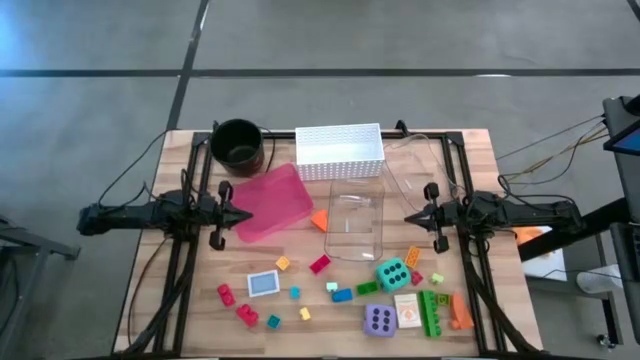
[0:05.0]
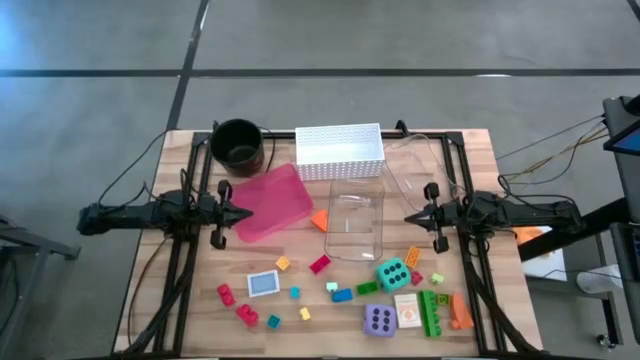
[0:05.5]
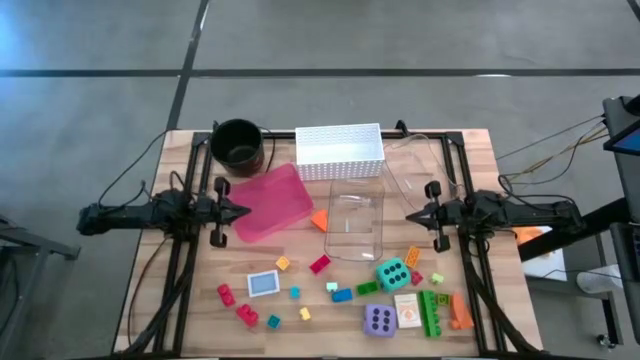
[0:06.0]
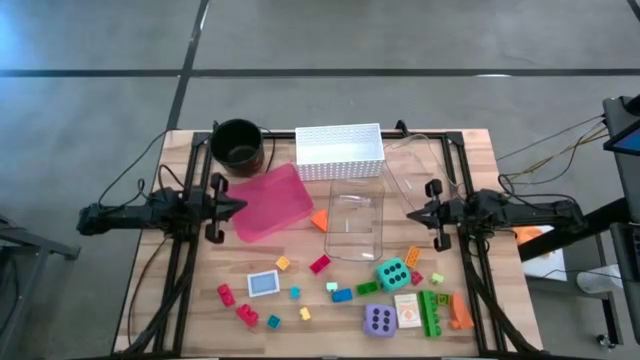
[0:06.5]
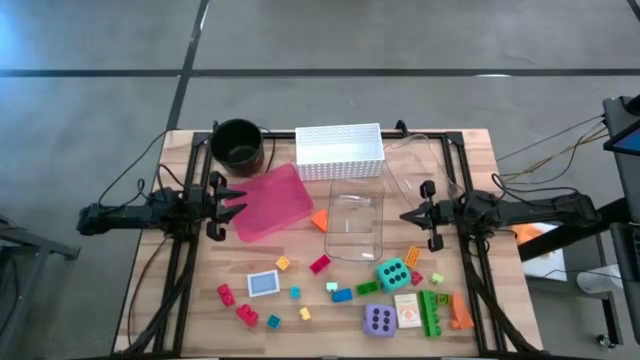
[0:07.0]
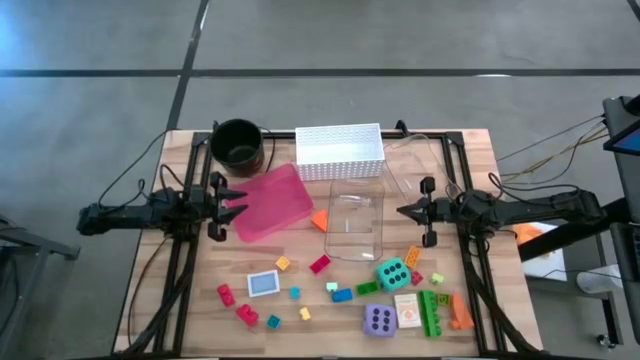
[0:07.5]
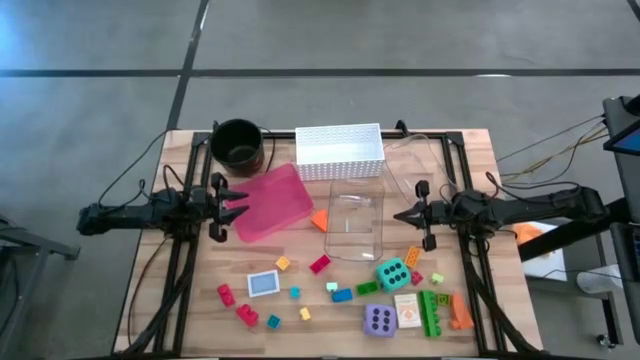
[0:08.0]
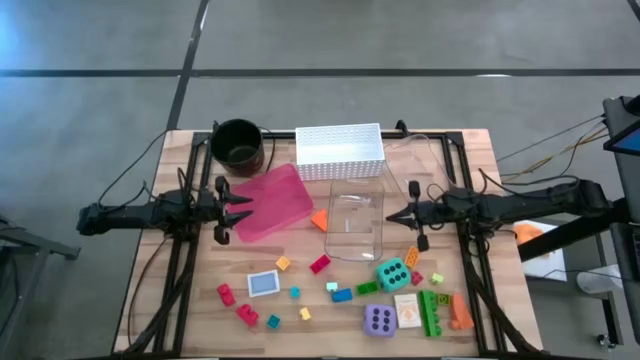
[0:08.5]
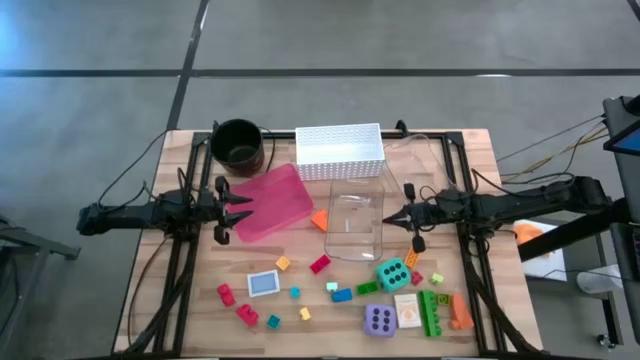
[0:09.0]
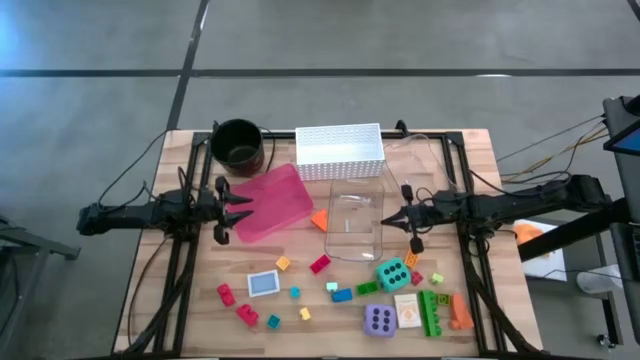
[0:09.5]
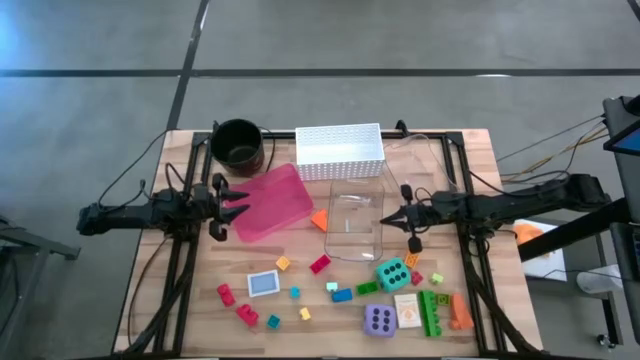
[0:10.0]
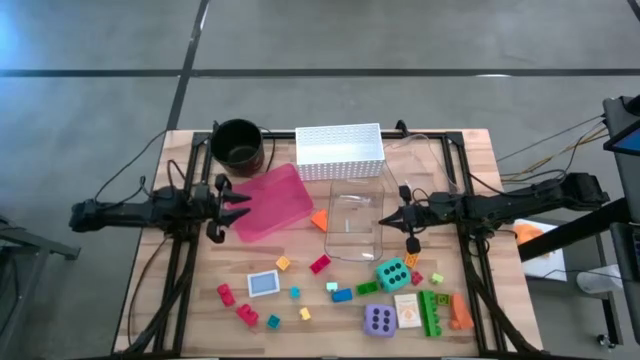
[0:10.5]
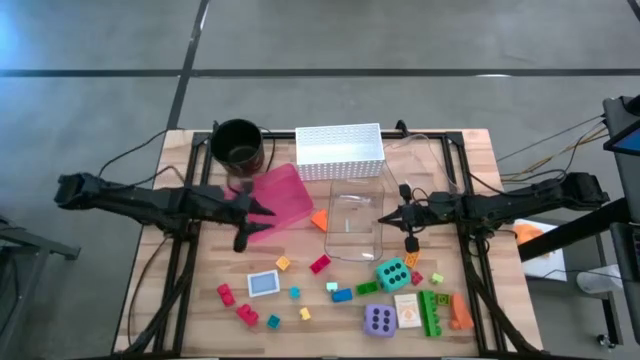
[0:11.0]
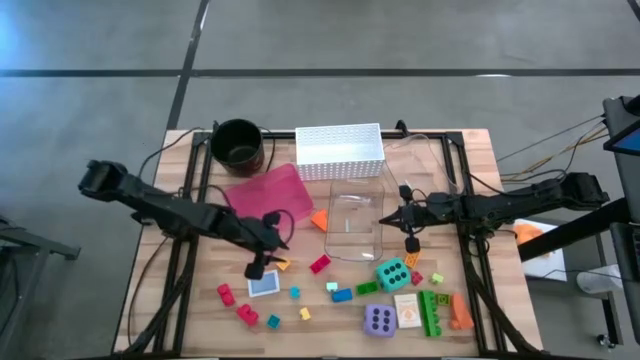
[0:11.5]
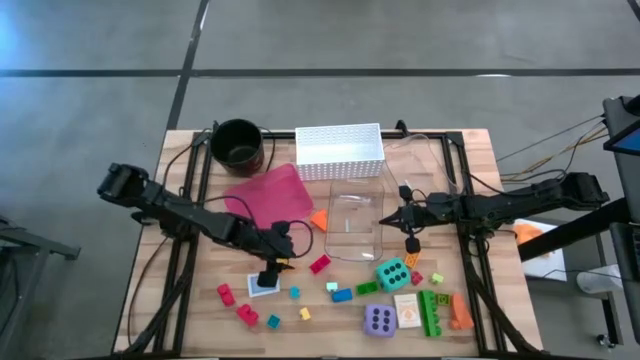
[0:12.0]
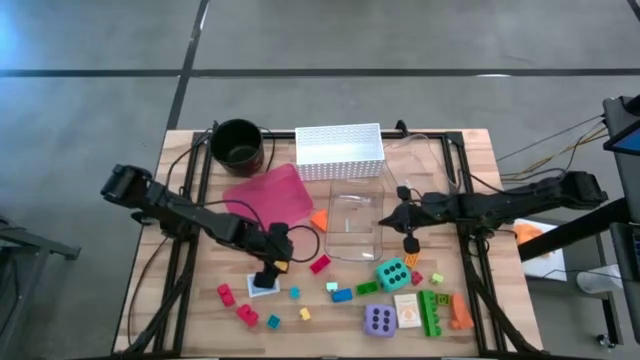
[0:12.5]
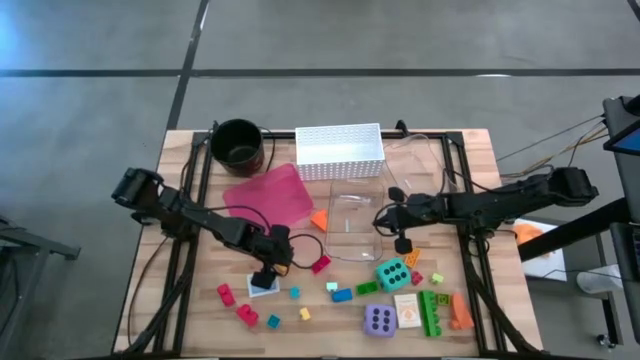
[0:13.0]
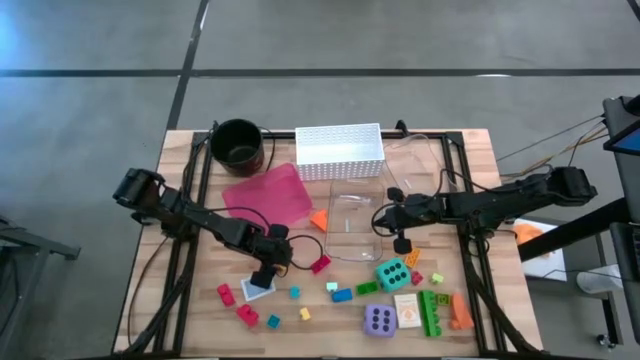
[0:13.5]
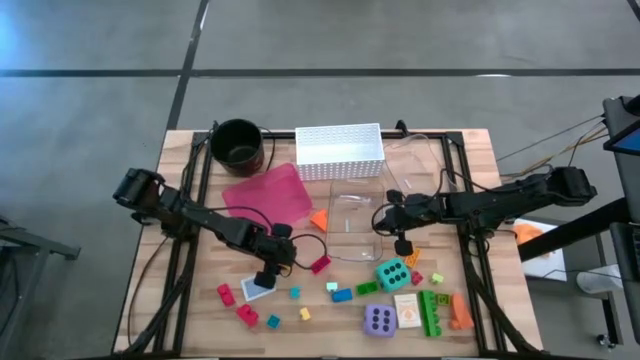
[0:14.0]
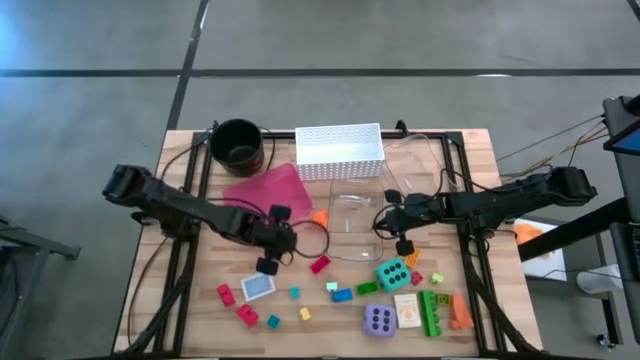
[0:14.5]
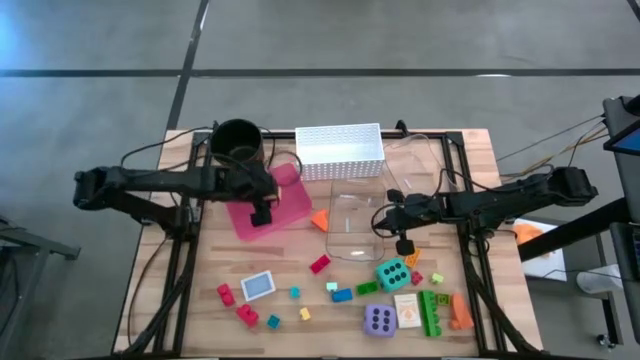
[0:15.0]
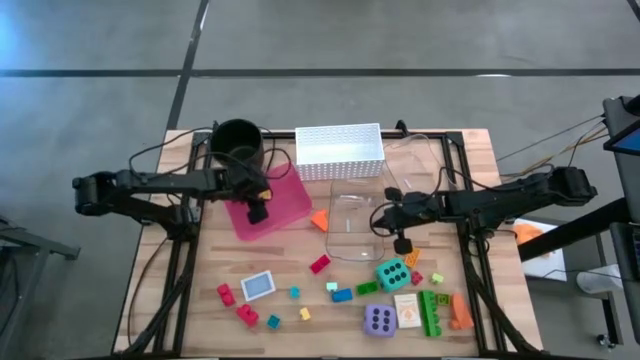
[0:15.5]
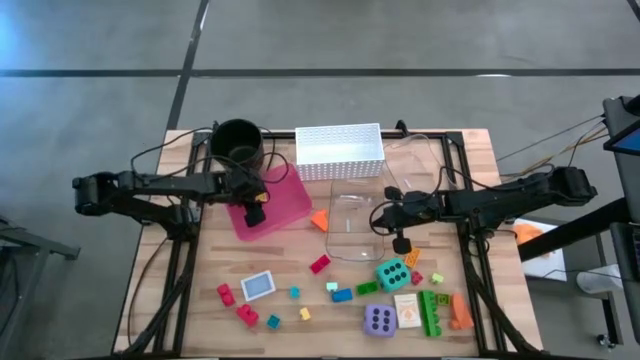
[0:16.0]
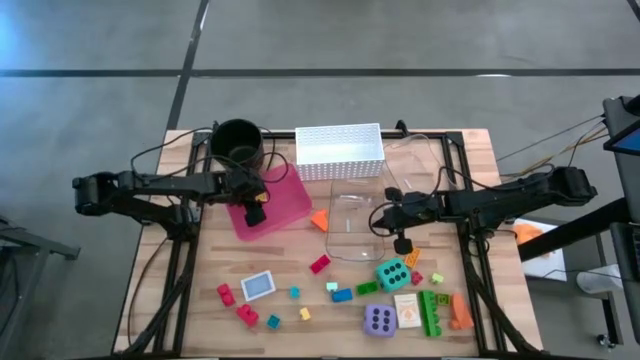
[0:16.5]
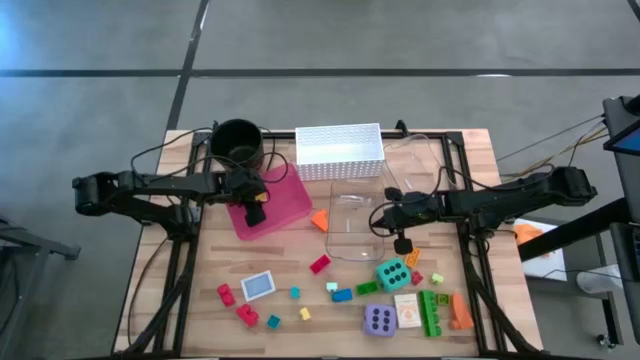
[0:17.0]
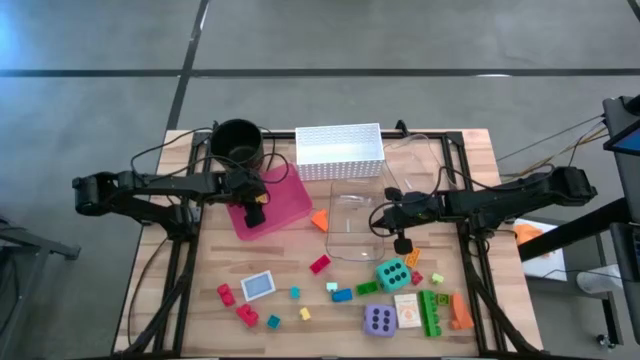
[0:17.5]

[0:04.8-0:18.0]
Task: Pick & Place Toys
Put the top yellow game piece into the red bin

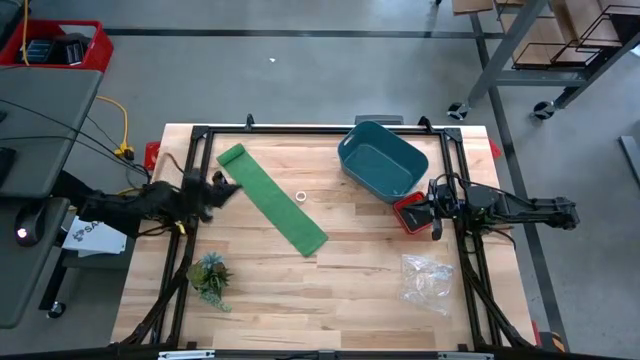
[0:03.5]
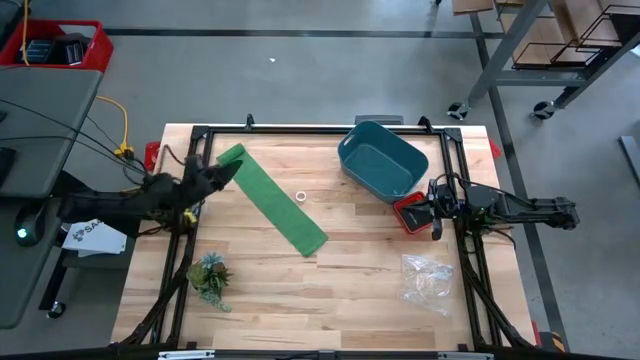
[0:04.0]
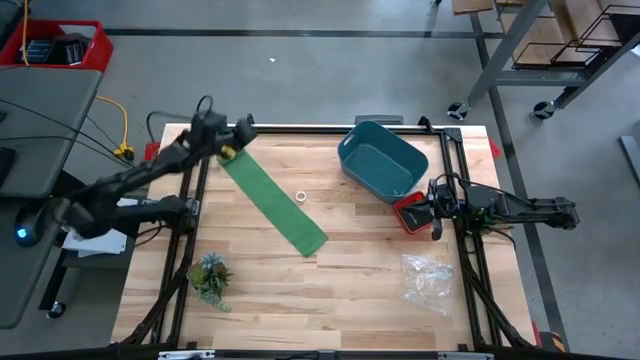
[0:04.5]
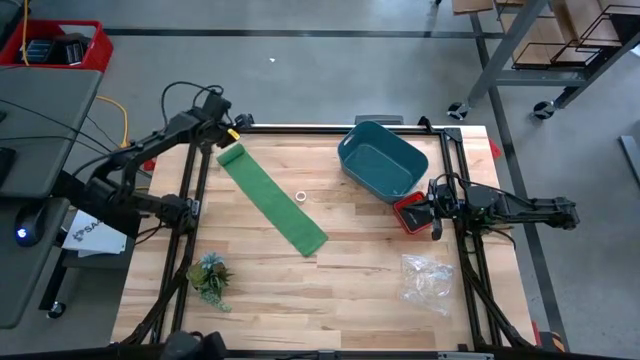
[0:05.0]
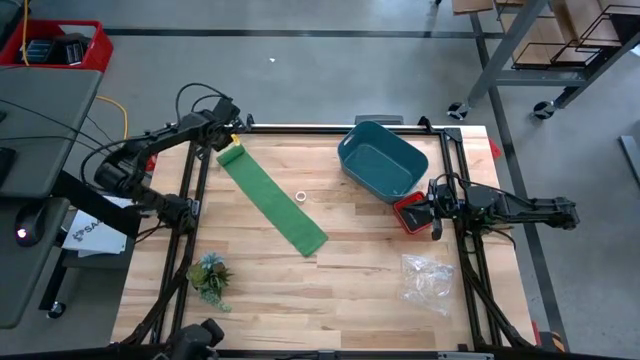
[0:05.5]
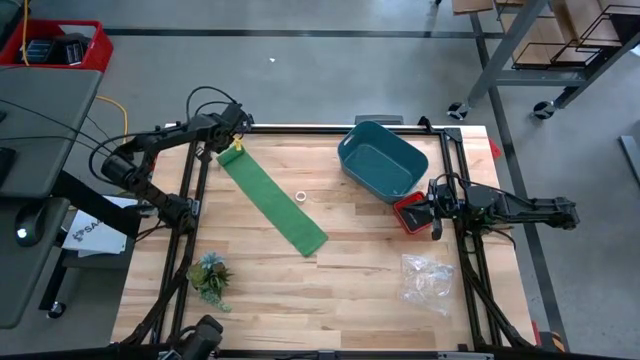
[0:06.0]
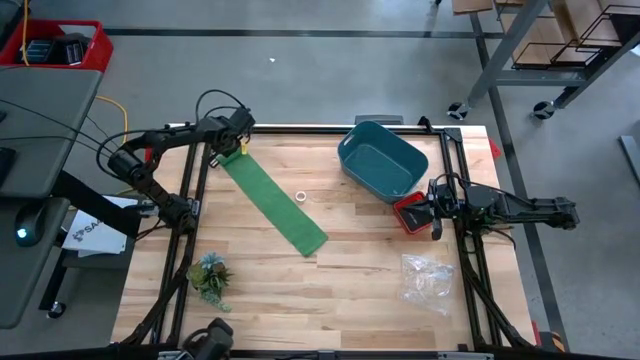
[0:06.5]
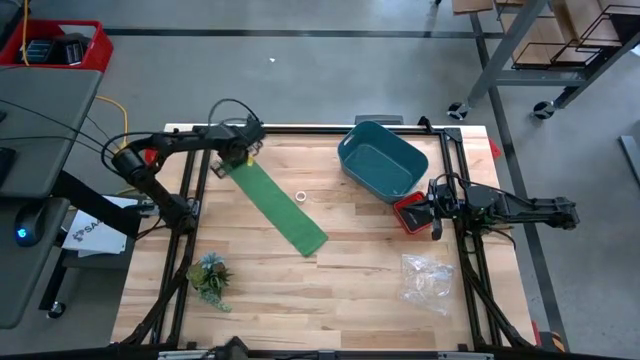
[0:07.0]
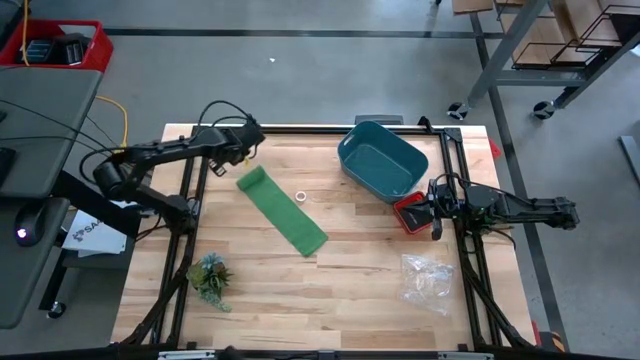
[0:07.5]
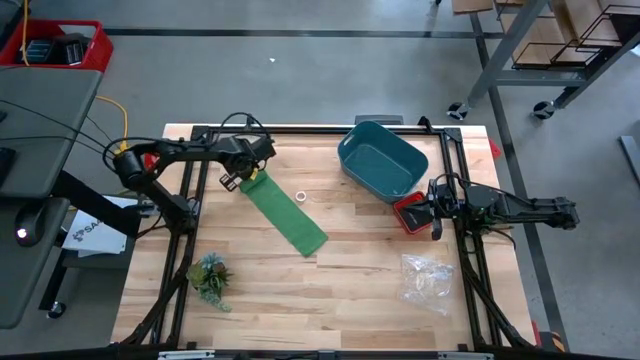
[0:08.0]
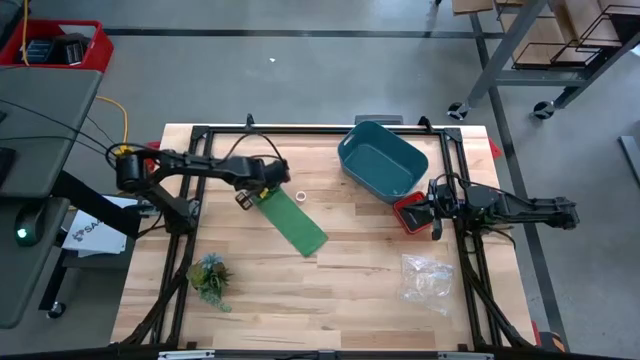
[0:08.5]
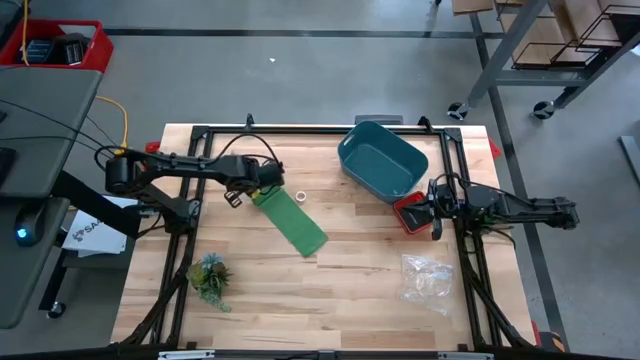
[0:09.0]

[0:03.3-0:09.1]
Task: Roll bandage
Roll the green bandage

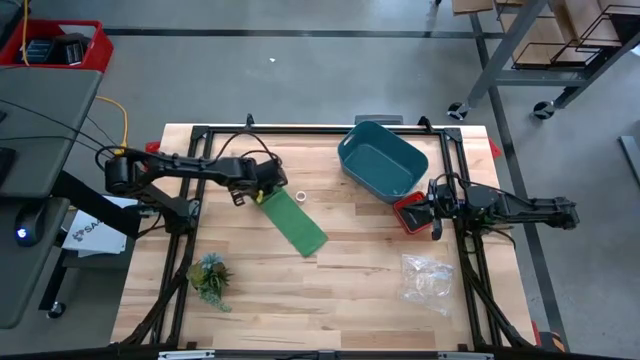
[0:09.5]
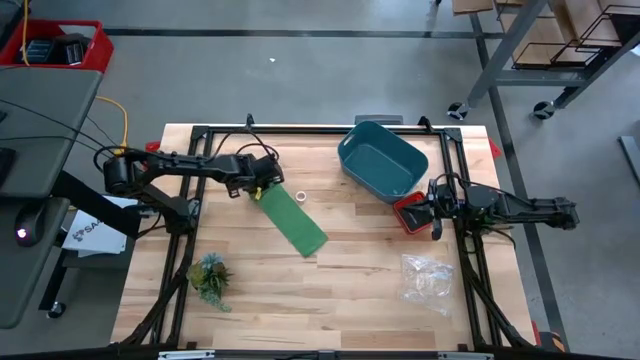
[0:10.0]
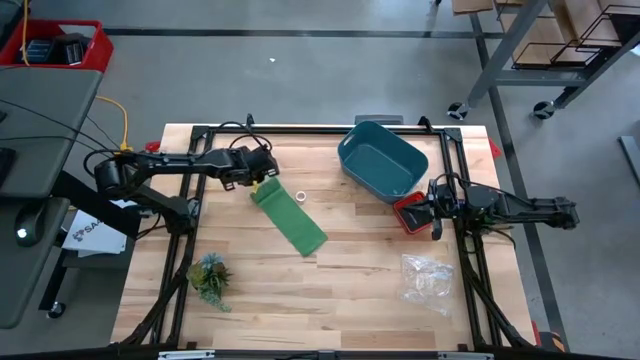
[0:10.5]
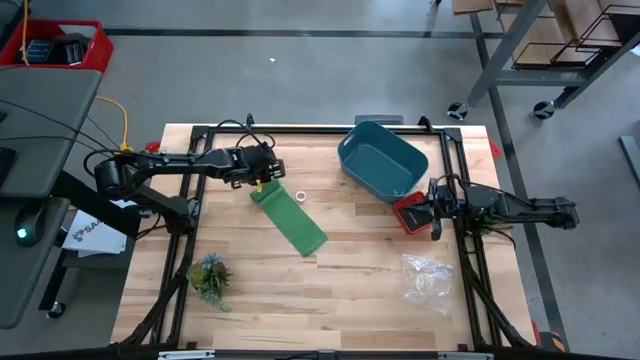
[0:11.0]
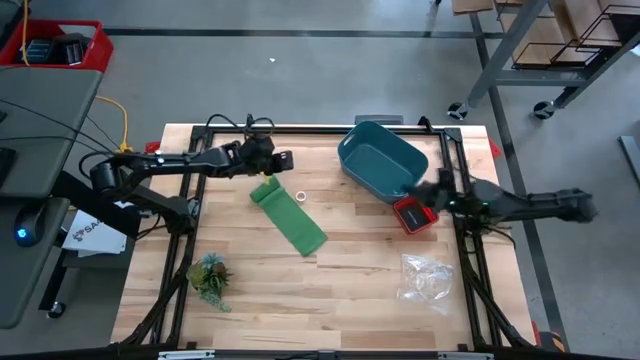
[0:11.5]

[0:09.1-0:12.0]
Roll the green bandage
